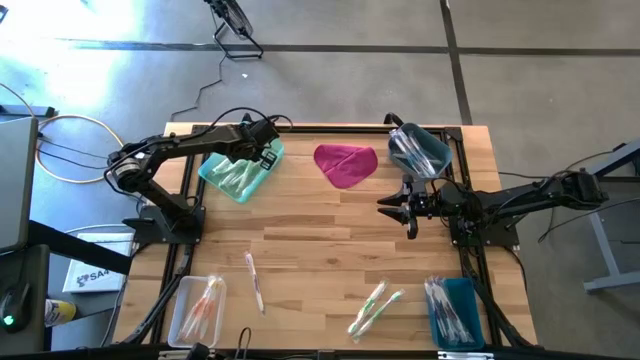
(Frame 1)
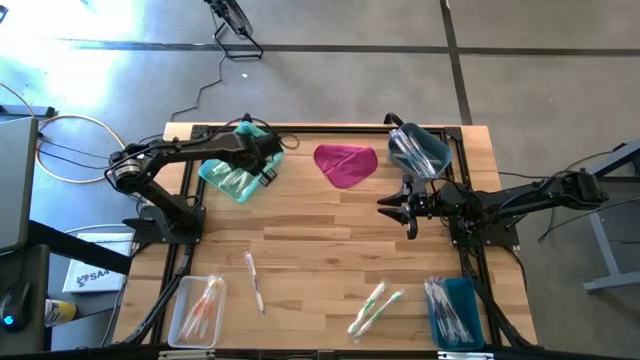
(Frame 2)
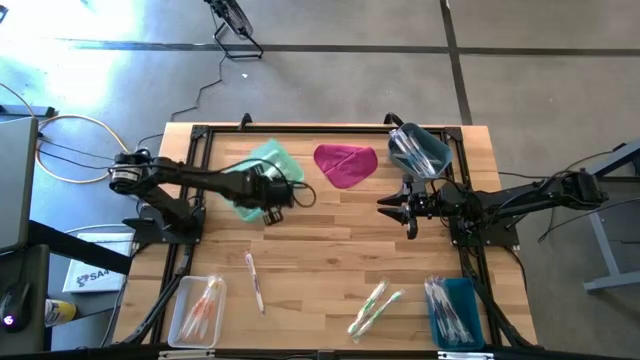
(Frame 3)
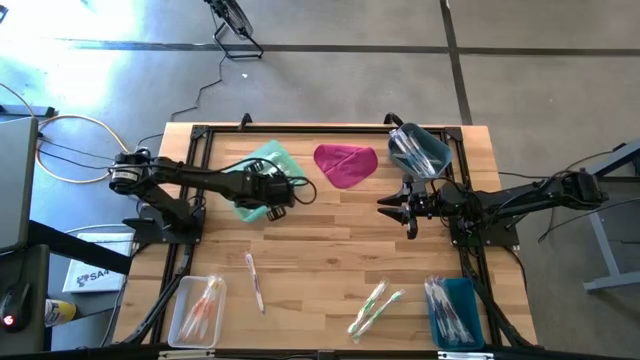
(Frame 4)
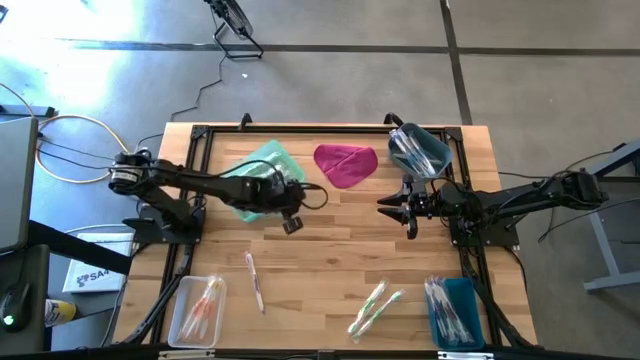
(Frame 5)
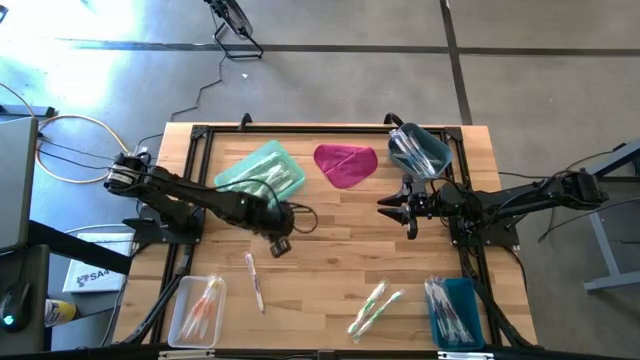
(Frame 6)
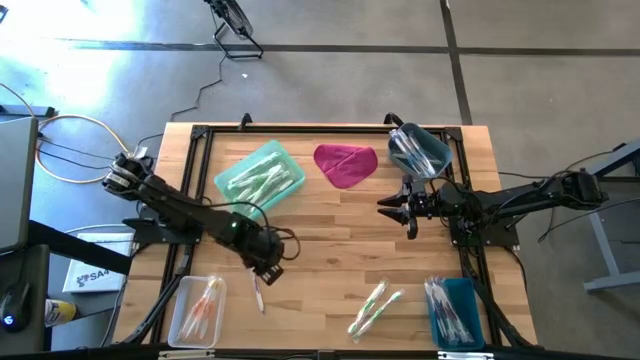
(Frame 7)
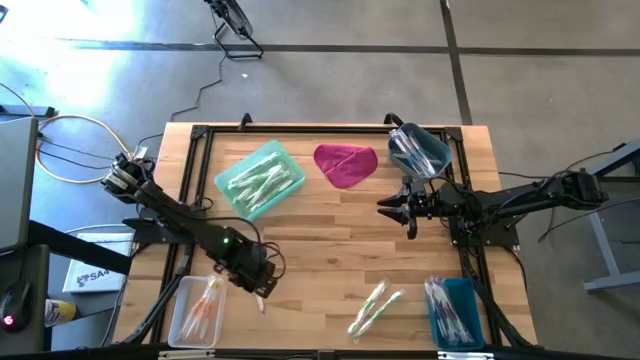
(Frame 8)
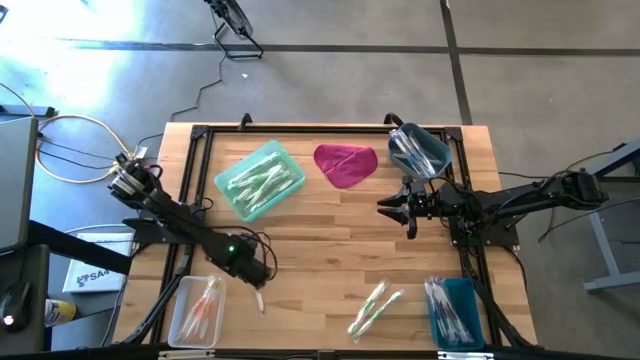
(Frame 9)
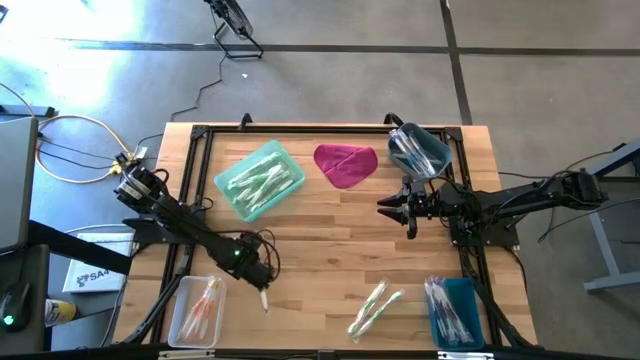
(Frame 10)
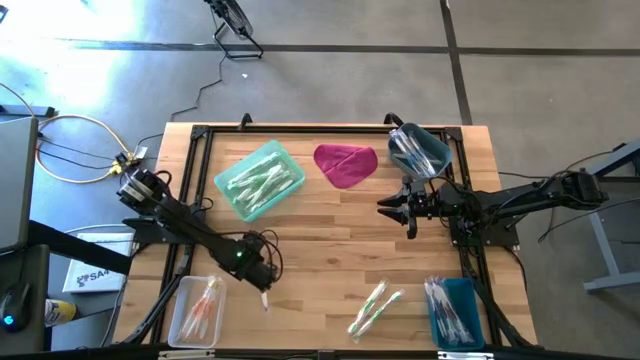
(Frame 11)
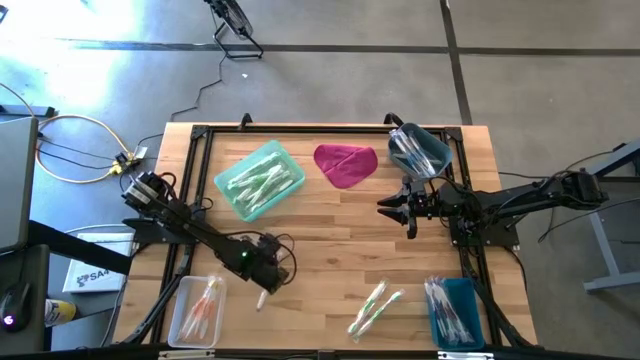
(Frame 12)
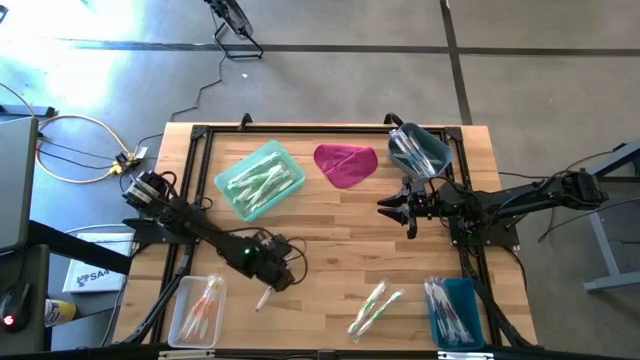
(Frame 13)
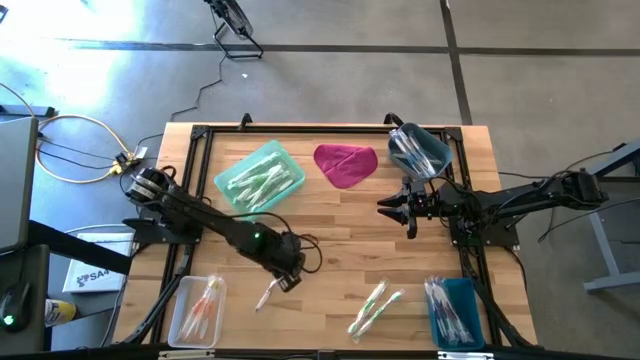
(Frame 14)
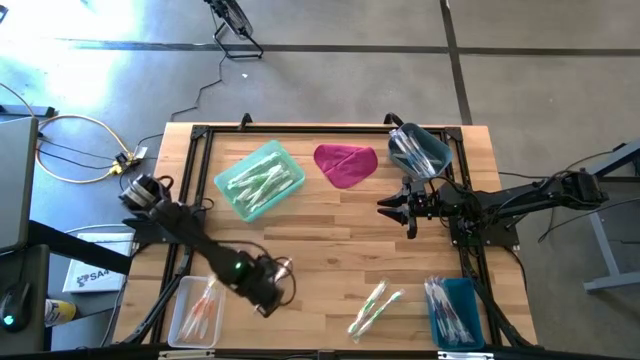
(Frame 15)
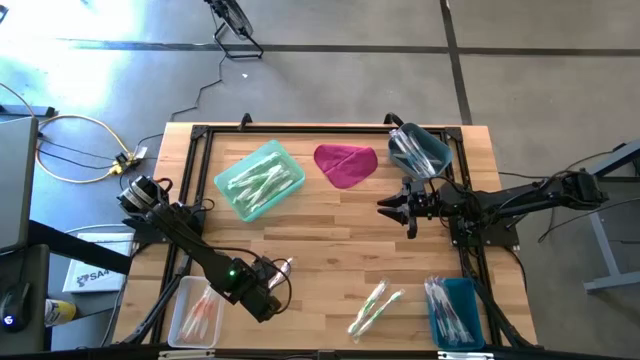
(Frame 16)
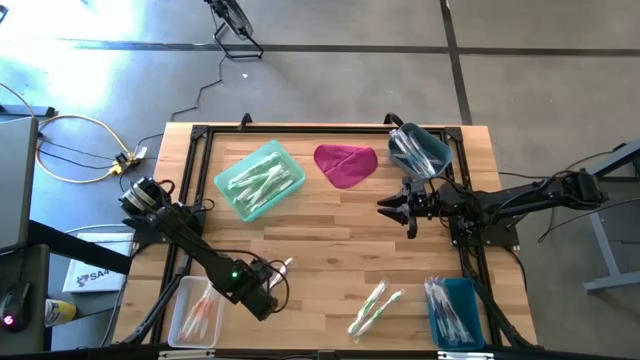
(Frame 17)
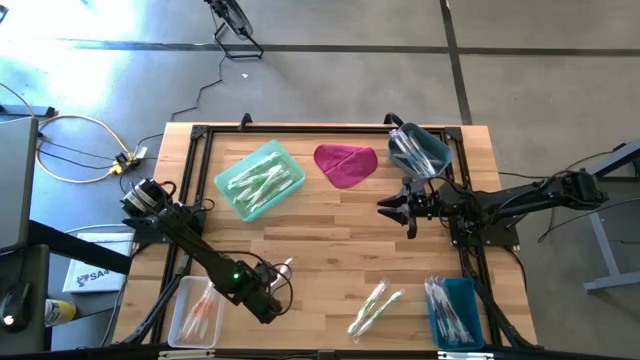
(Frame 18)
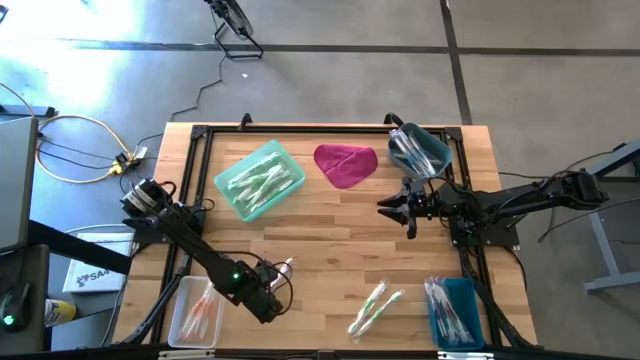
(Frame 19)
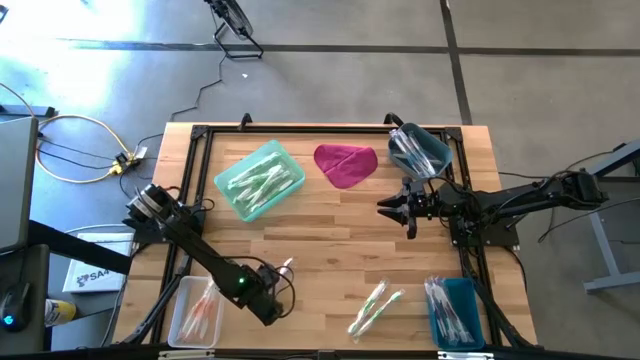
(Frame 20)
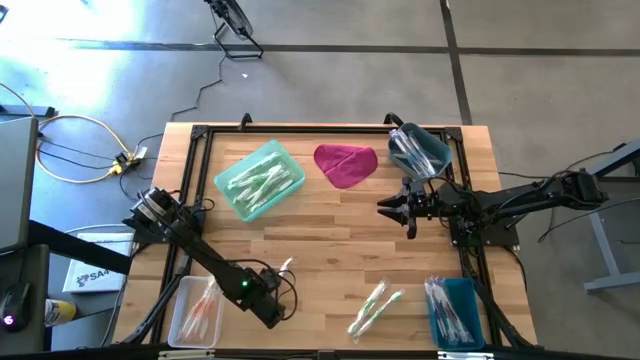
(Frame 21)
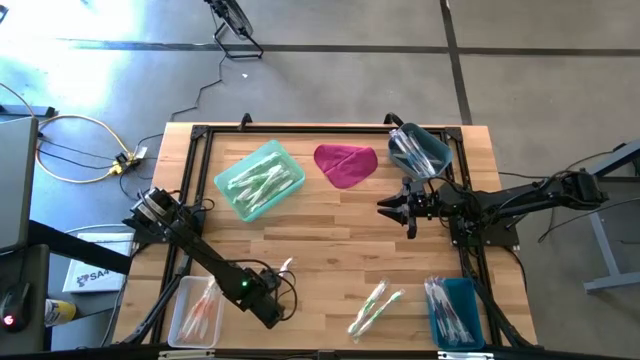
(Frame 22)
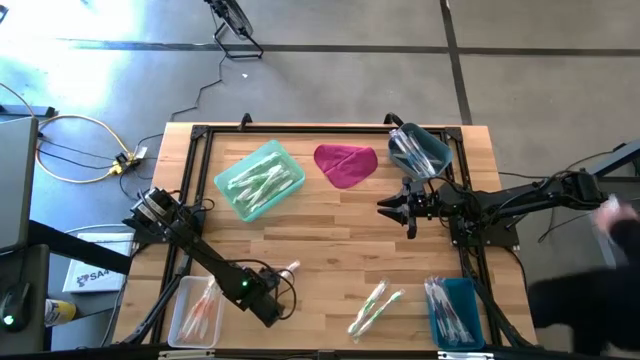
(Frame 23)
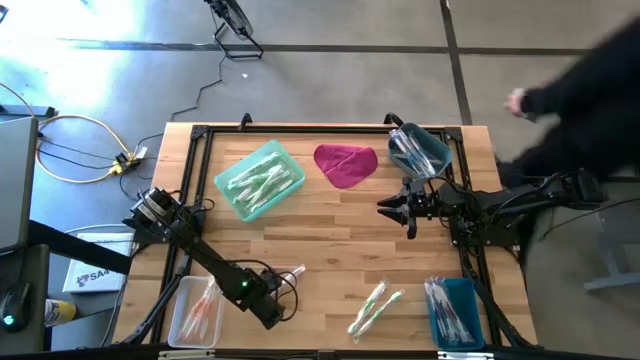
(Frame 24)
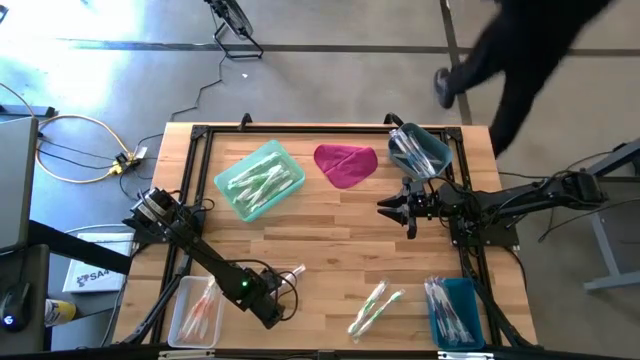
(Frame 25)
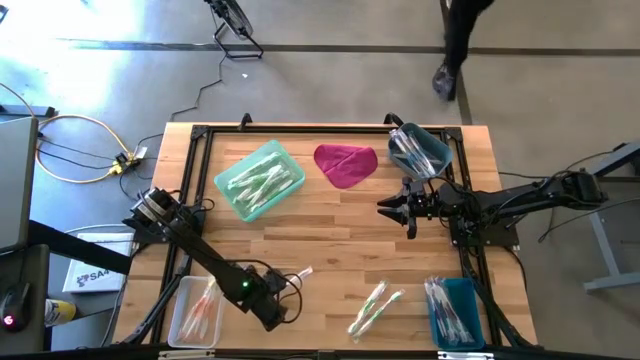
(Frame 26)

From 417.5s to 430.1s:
Task: Pick & Place Toothbrushes
Put the purple toothbrush to the dark blue bin bin

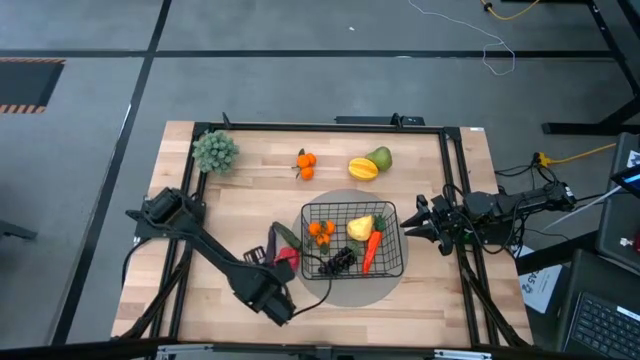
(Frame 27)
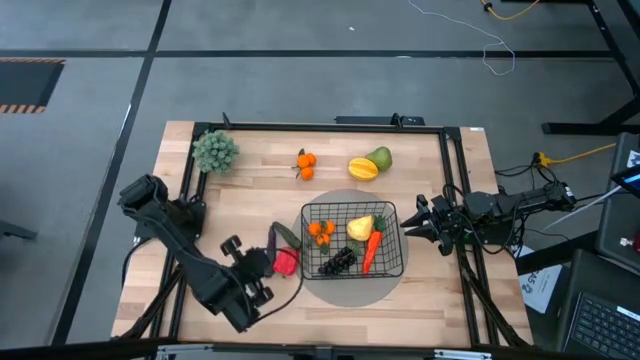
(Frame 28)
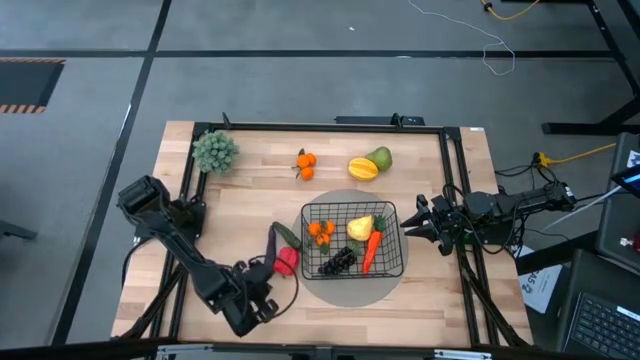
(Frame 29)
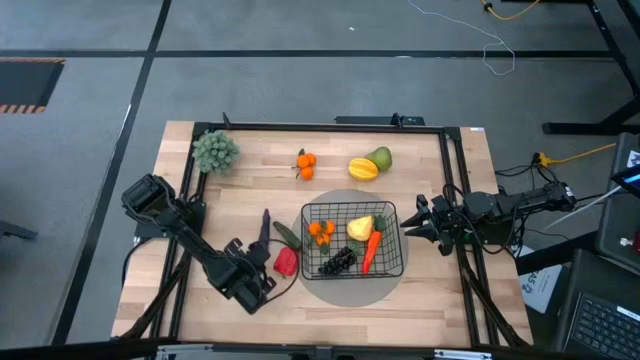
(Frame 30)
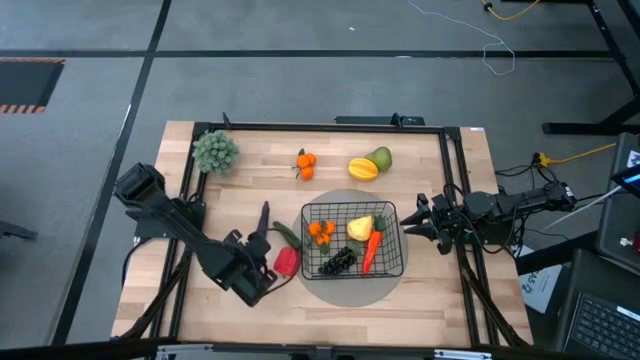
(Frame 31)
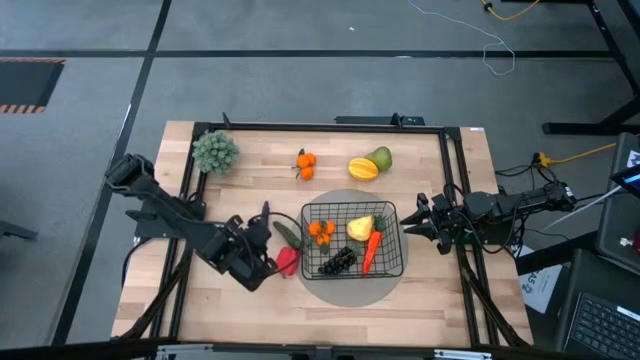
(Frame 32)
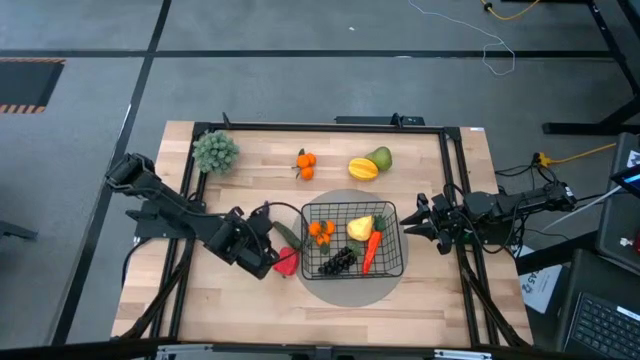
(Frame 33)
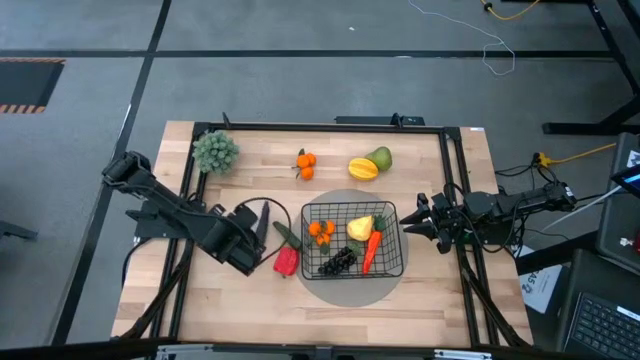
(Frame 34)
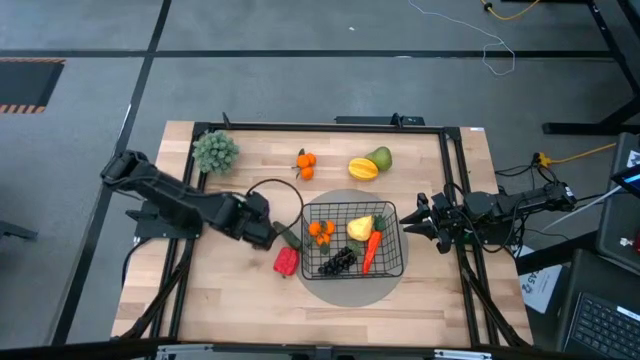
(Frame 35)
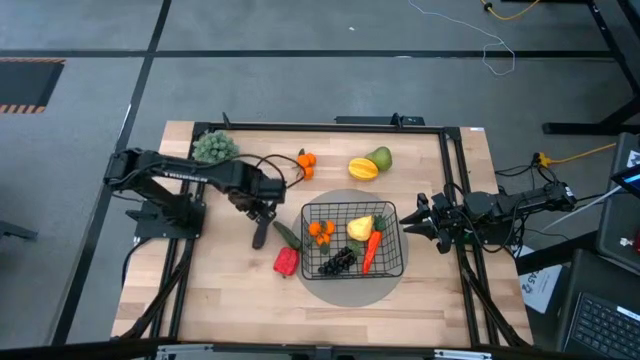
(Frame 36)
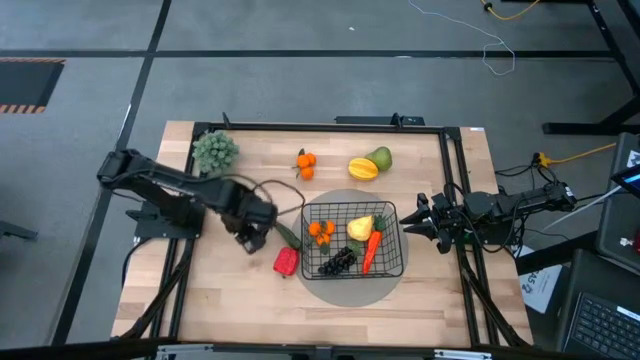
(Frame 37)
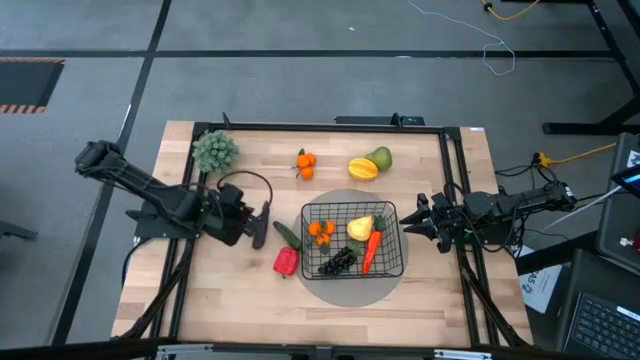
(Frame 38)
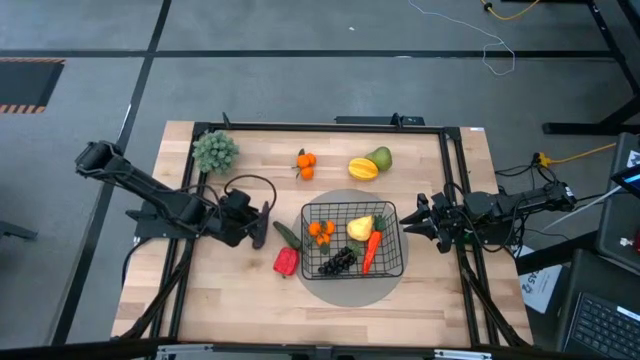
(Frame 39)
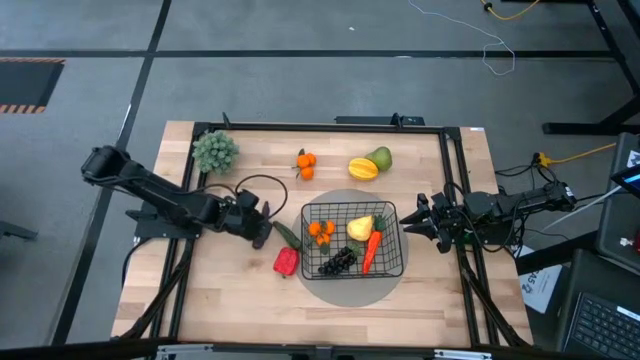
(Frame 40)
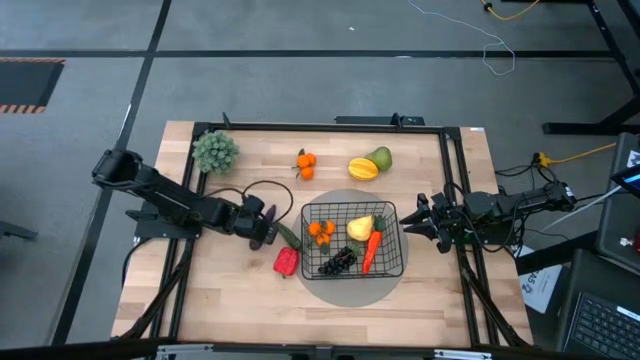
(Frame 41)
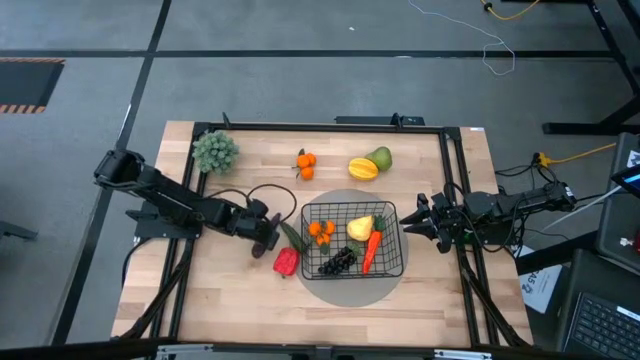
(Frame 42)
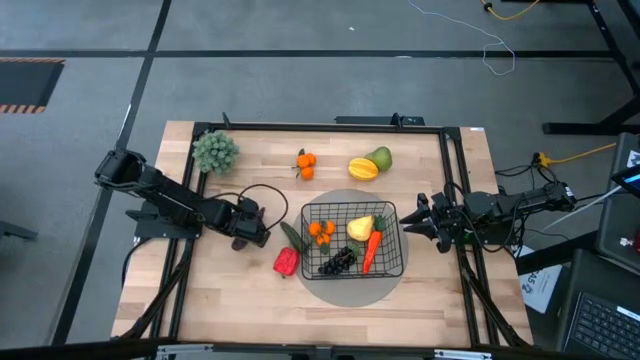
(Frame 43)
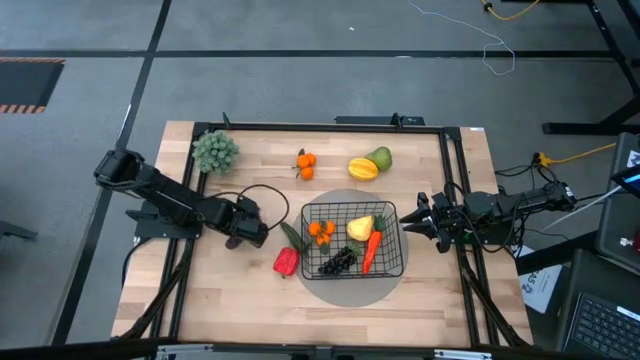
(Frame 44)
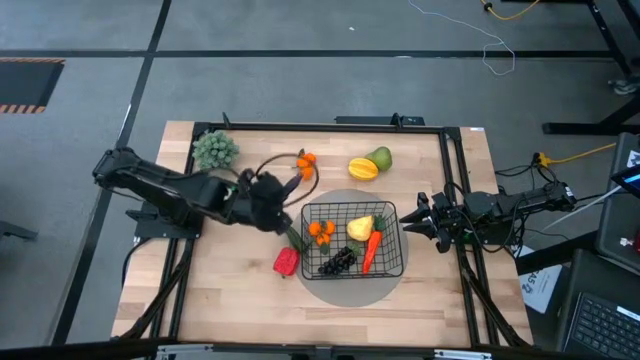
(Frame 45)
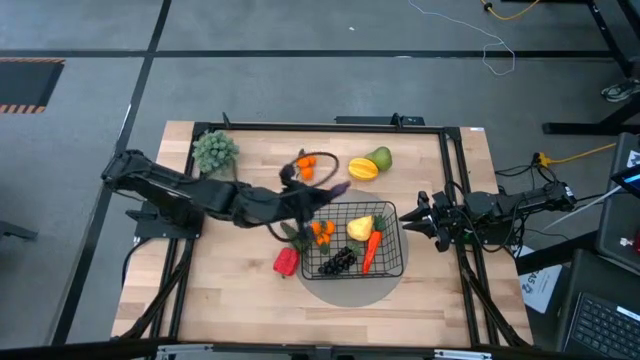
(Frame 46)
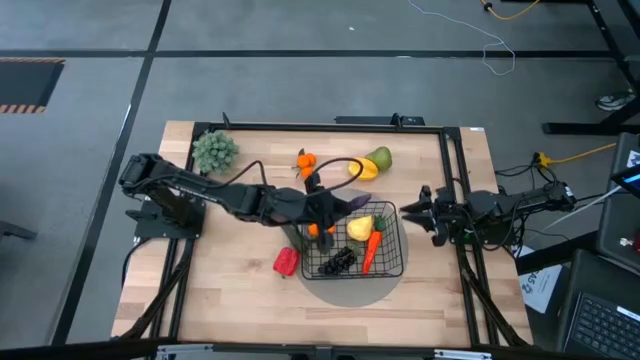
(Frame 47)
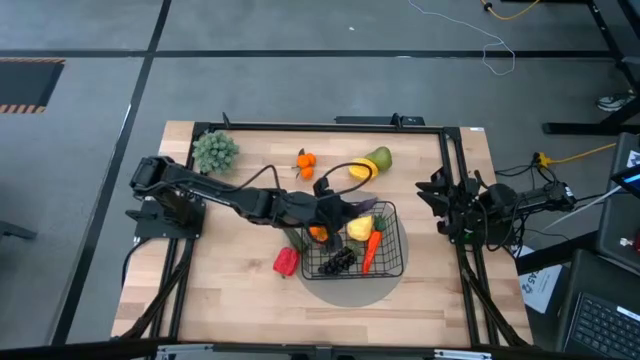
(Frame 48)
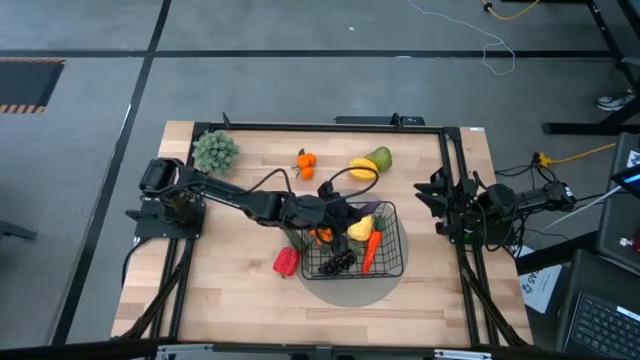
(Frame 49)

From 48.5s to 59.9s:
Task: Build produce basket
Put the violet eggplant into the black wire basket
